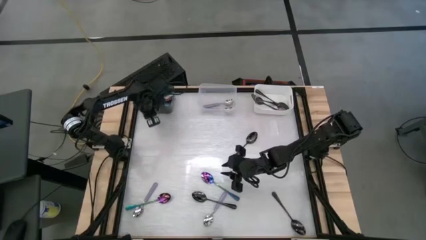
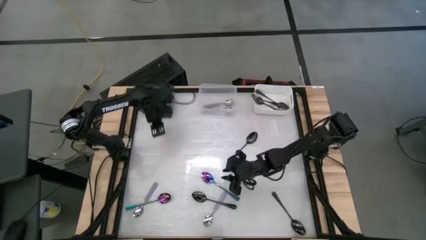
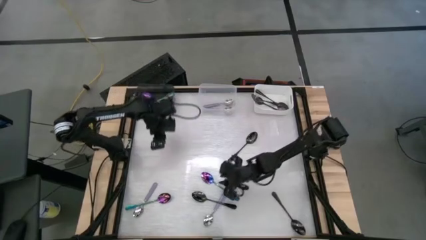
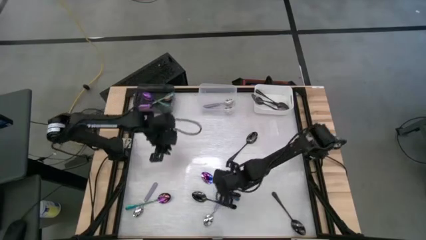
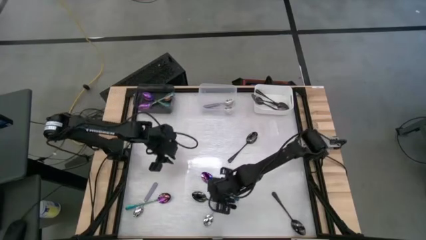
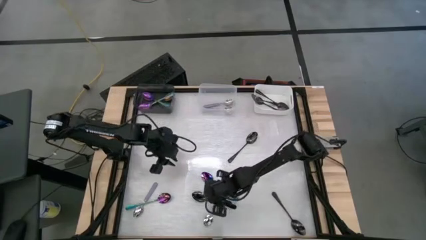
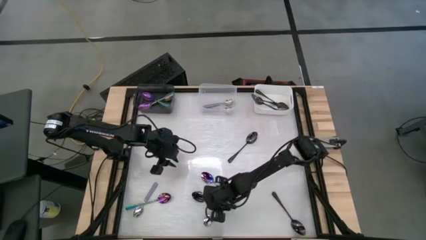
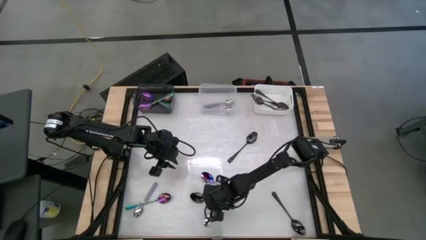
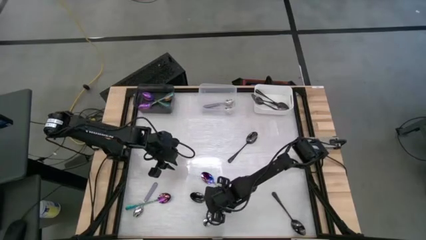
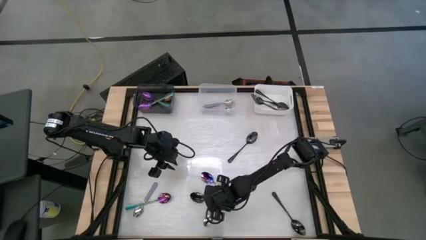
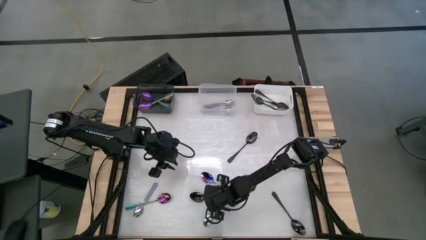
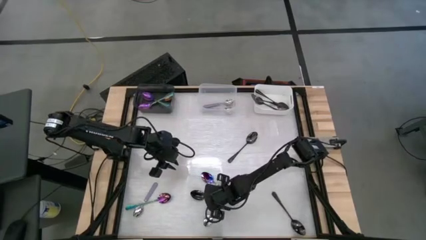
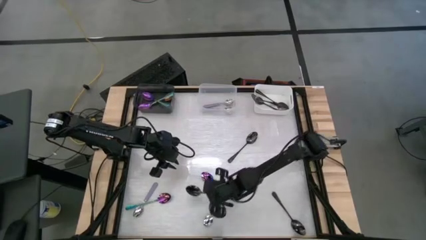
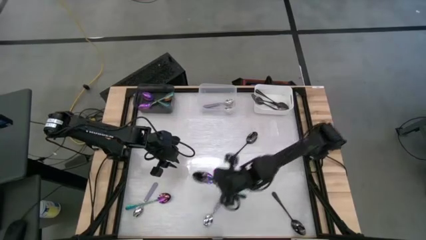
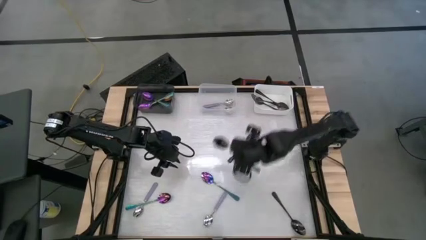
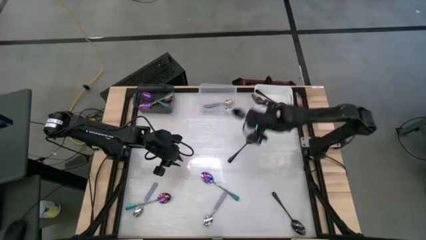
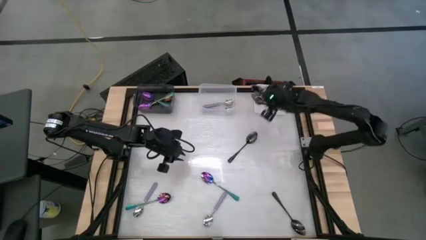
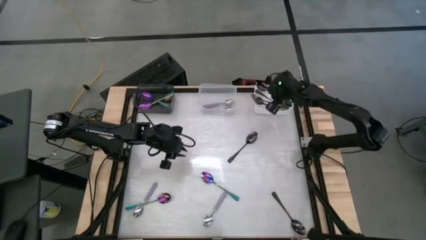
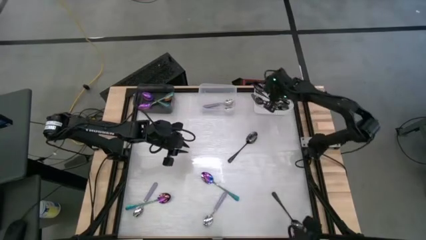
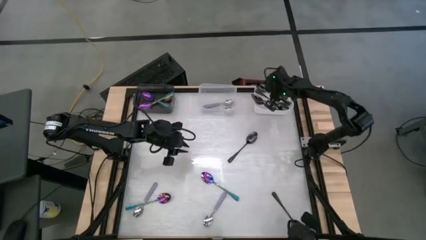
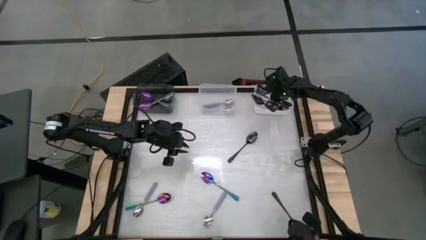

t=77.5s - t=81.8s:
Task: Sort silverware by color (type)
Put the black spoon into the white bin

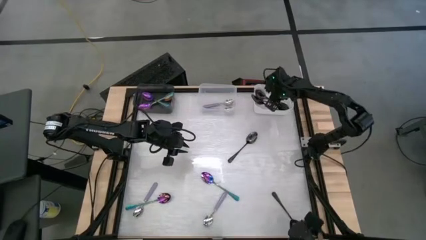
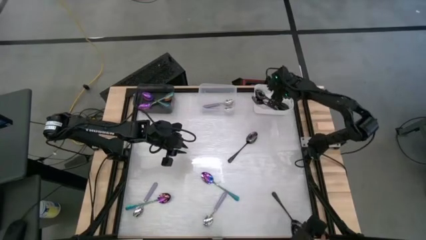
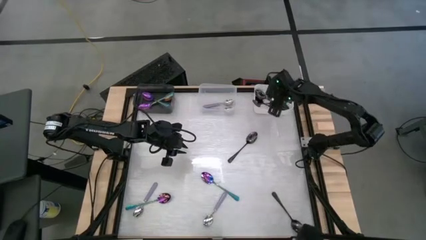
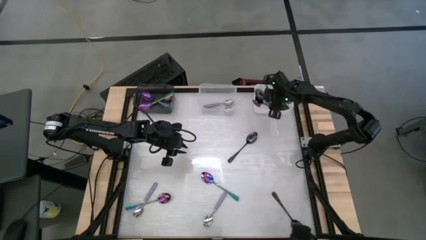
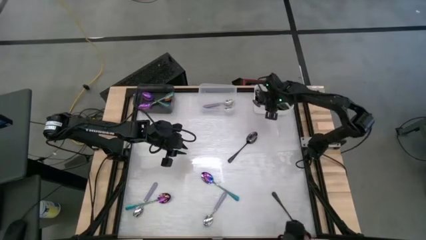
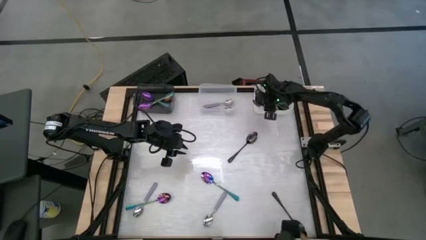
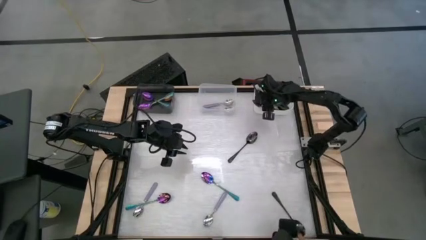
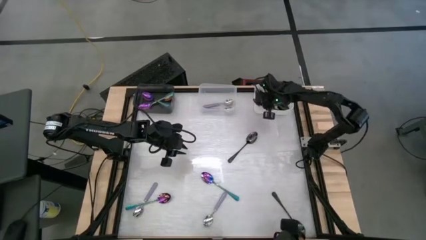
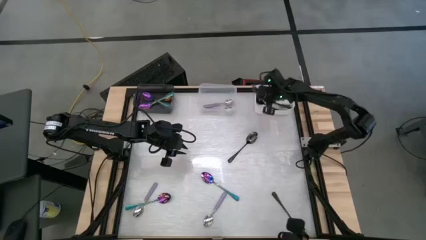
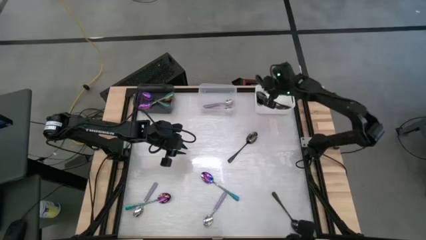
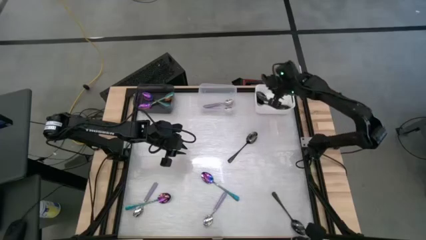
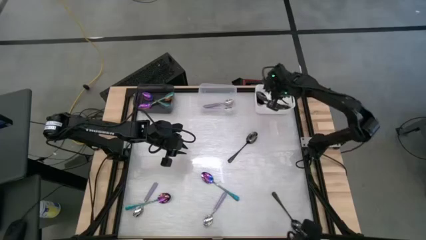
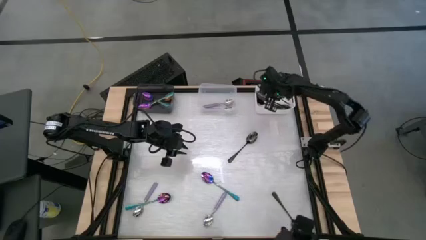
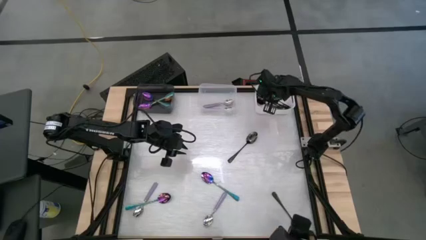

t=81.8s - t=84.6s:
Put the black spoon into the white bin

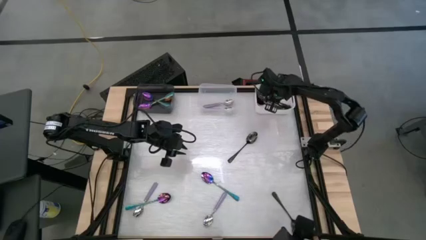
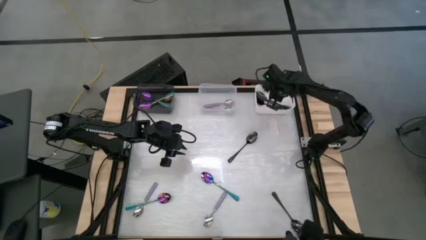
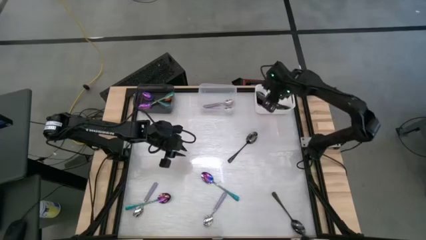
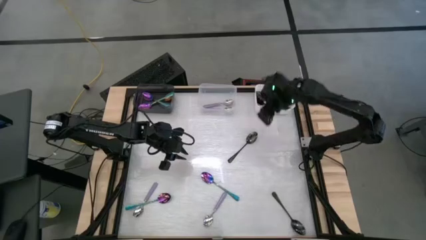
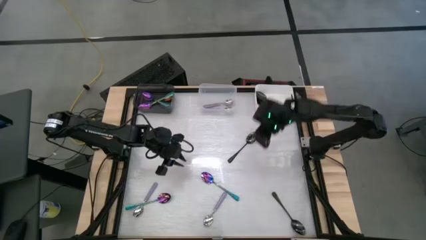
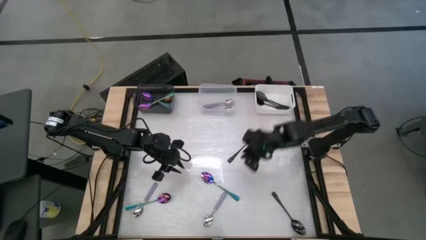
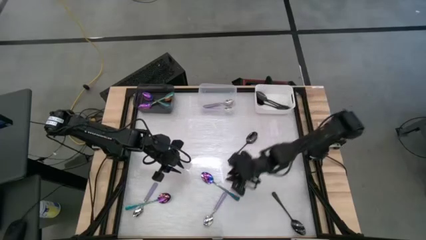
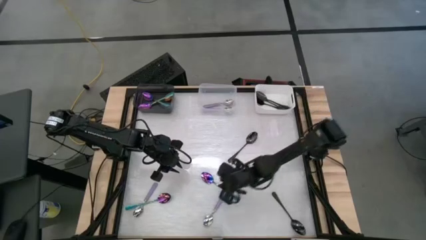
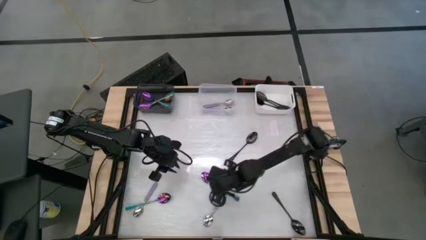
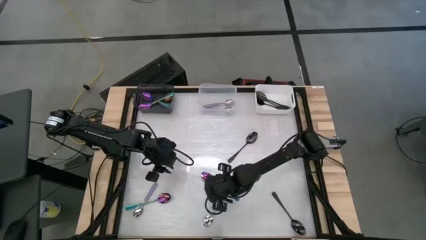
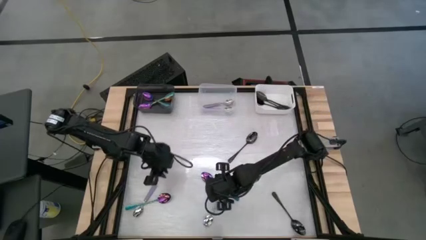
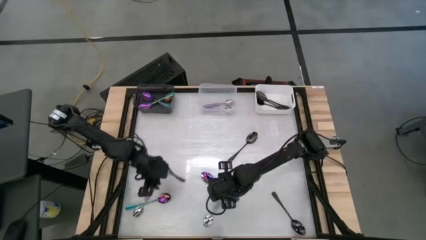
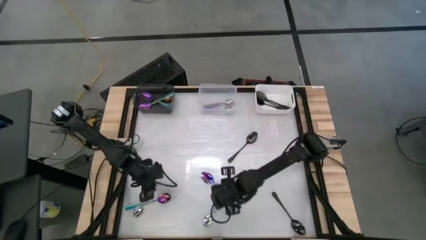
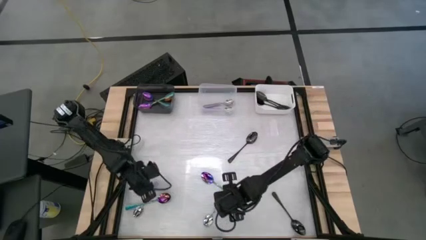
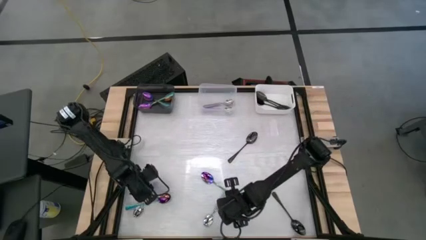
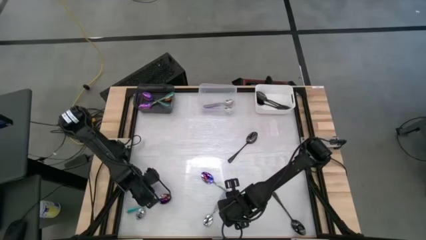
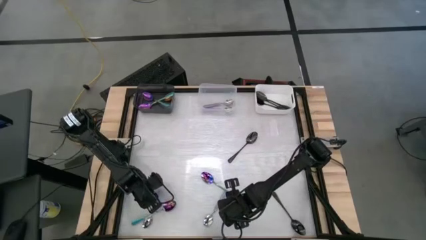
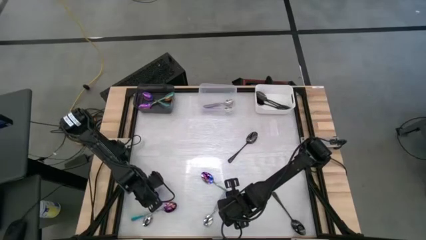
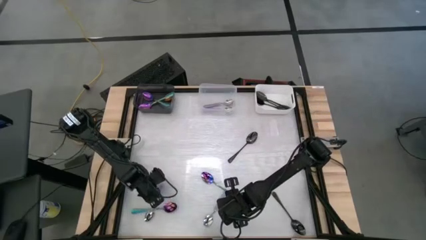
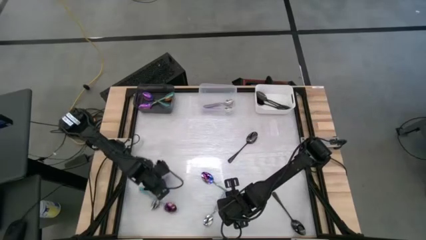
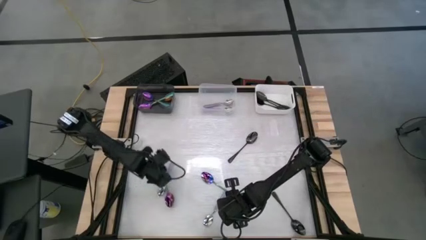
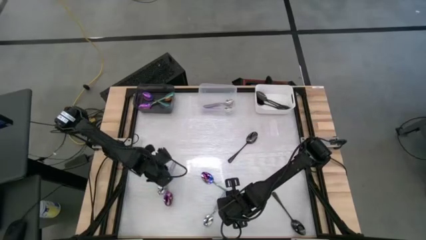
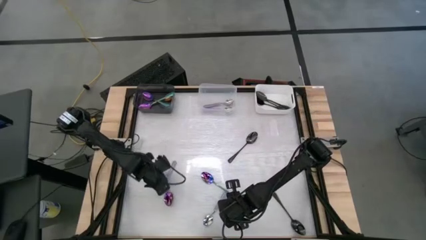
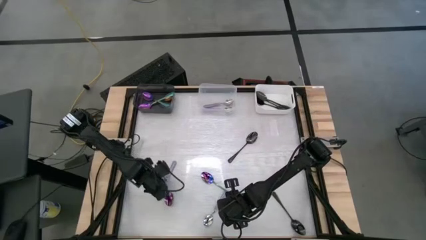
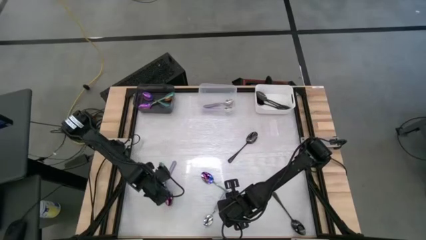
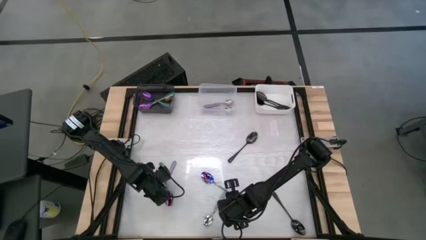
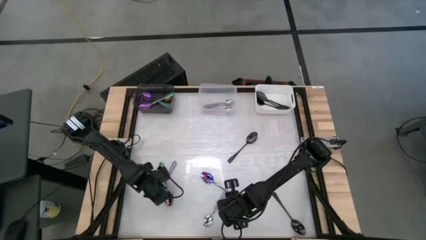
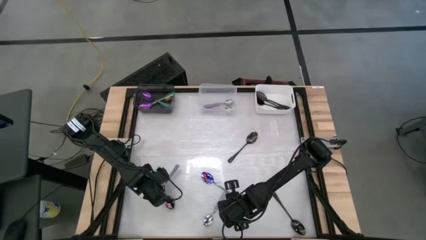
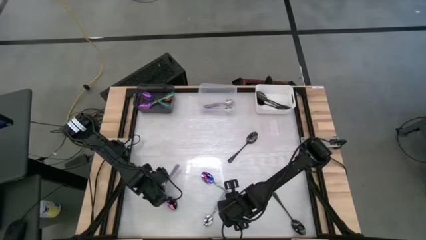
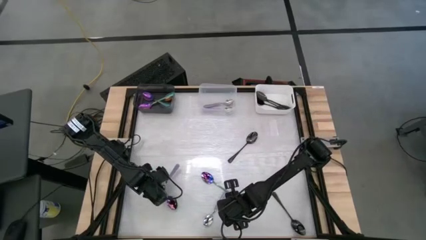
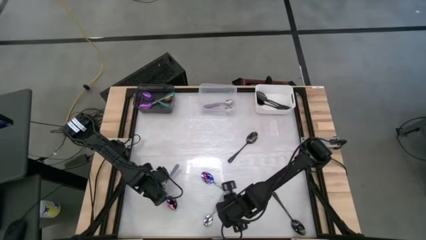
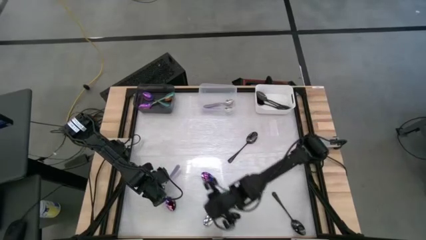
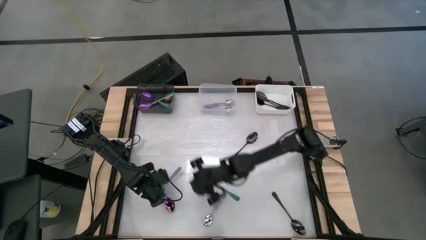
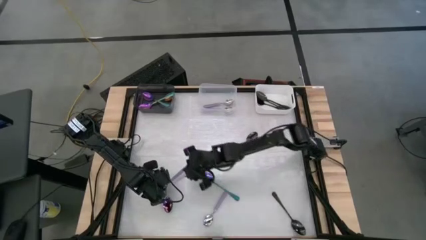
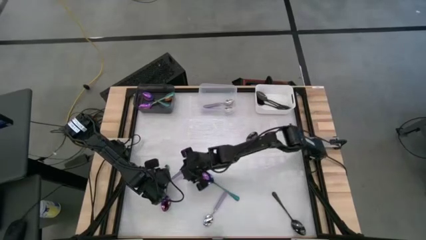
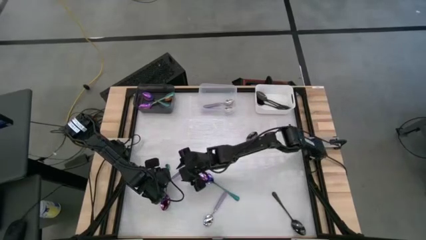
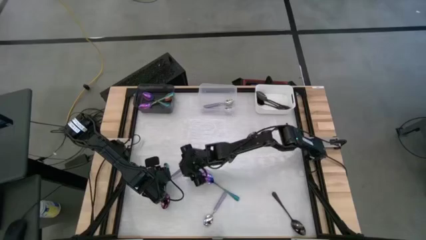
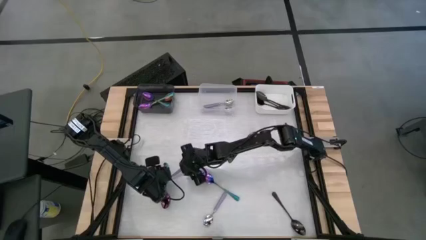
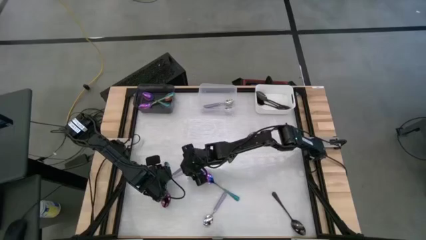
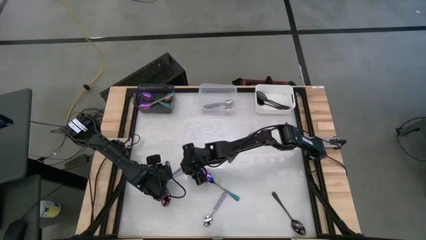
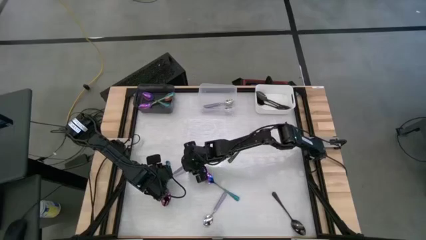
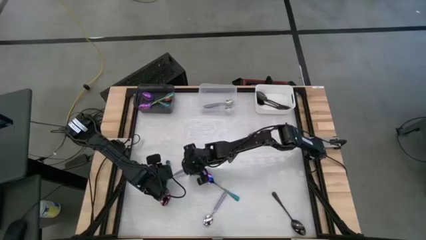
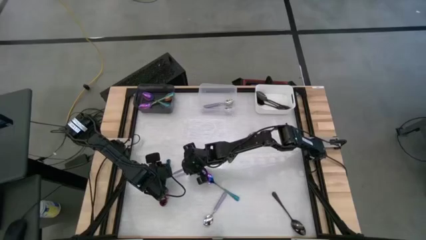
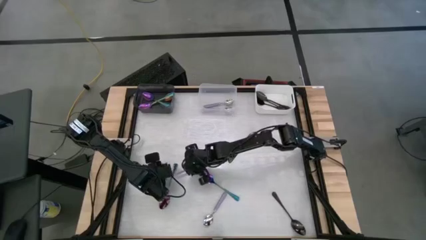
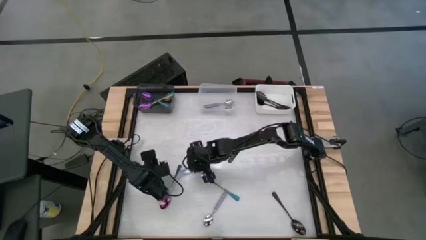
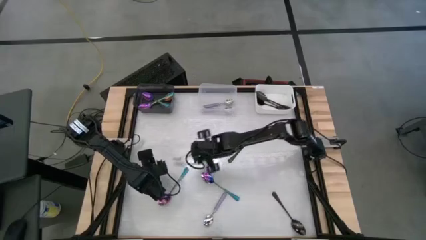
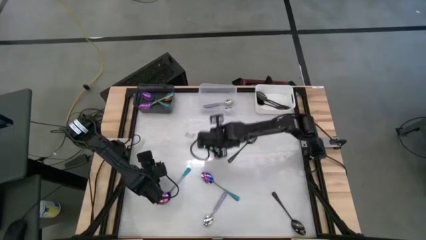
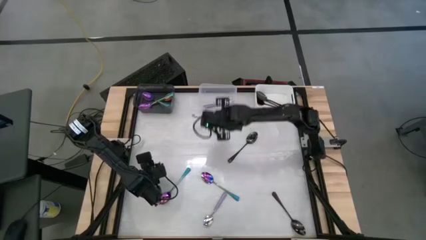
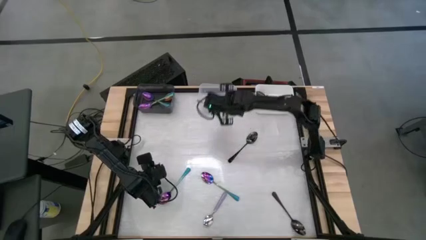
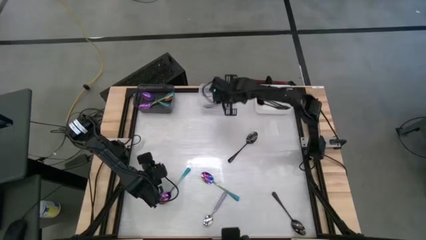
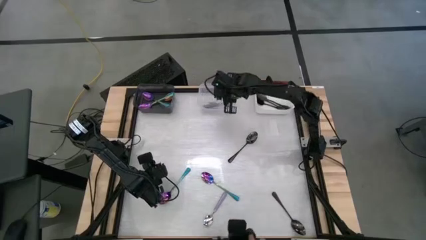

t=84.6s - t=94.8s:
Put the purple spoon into the transparent bin
